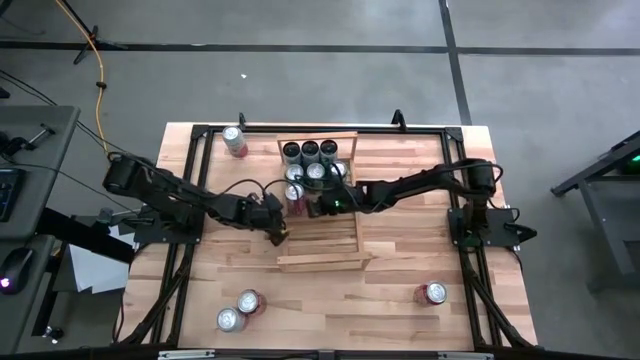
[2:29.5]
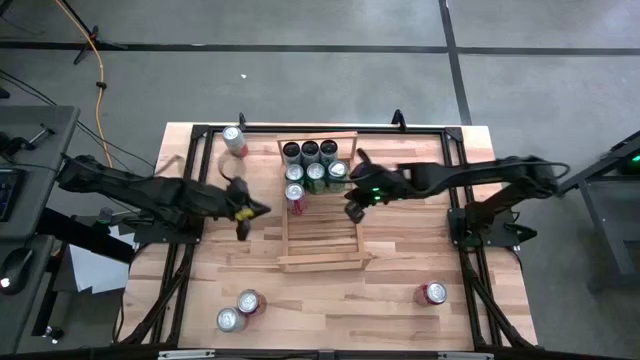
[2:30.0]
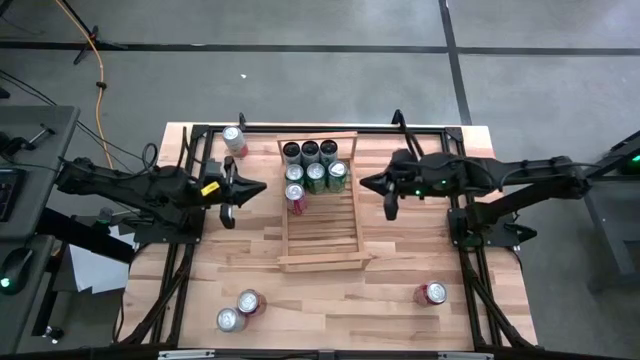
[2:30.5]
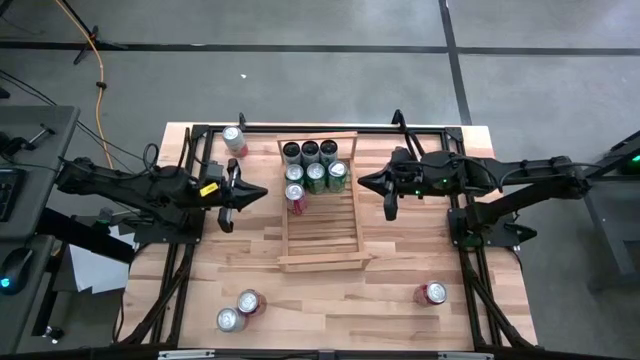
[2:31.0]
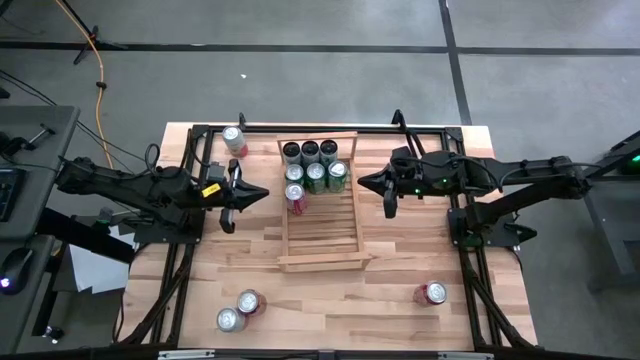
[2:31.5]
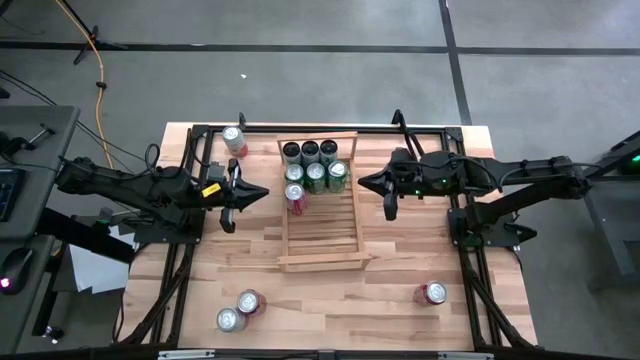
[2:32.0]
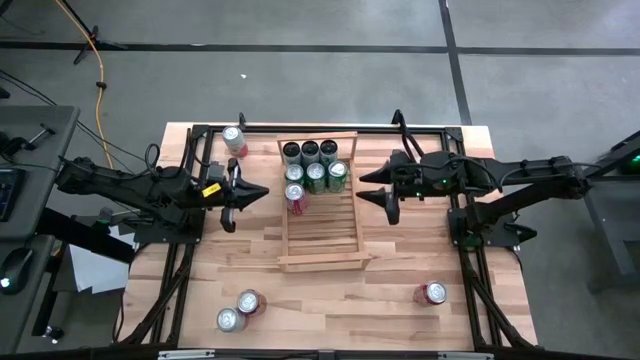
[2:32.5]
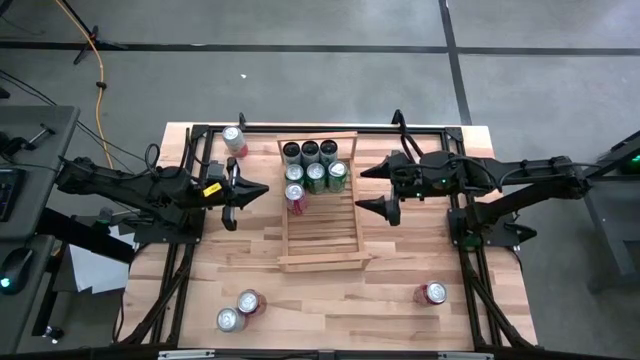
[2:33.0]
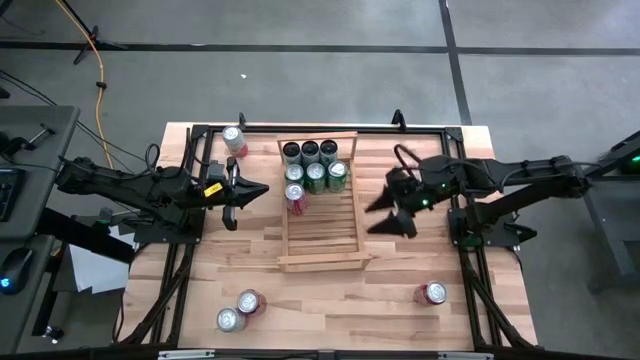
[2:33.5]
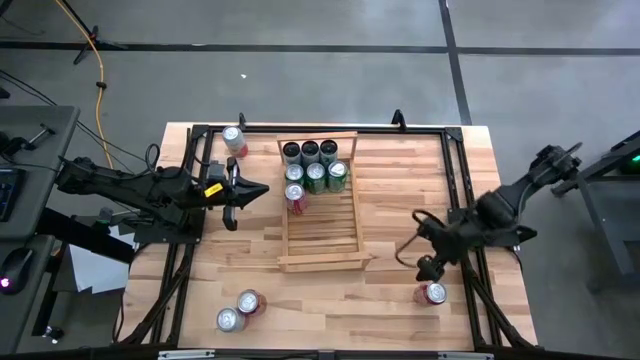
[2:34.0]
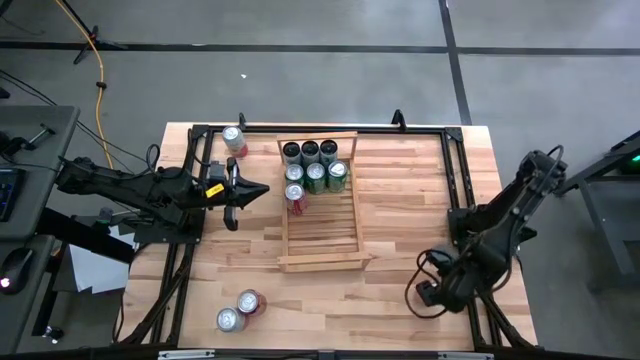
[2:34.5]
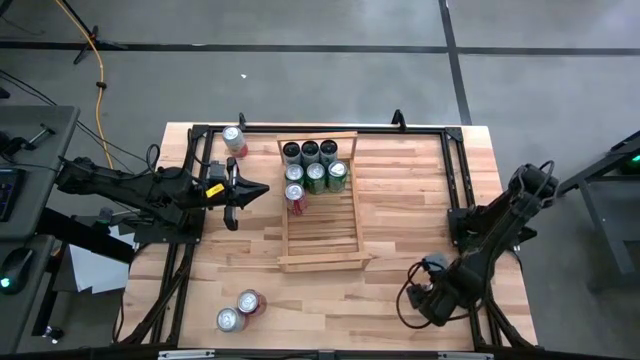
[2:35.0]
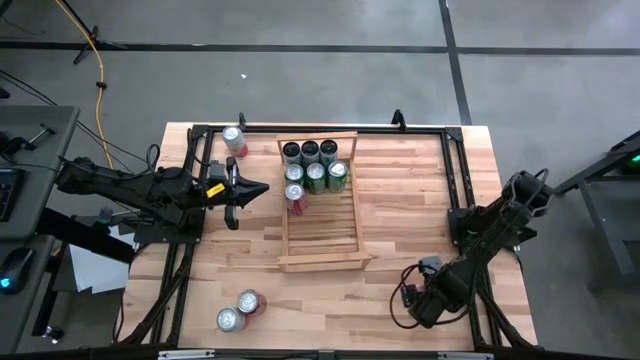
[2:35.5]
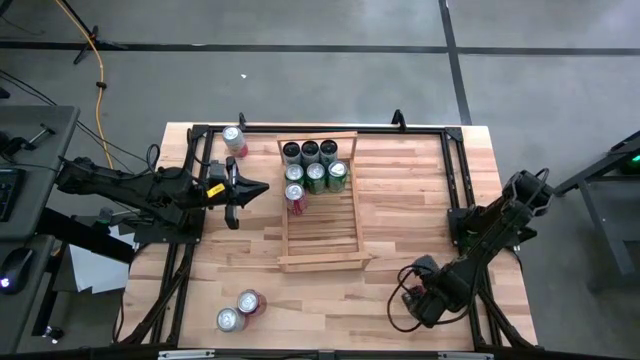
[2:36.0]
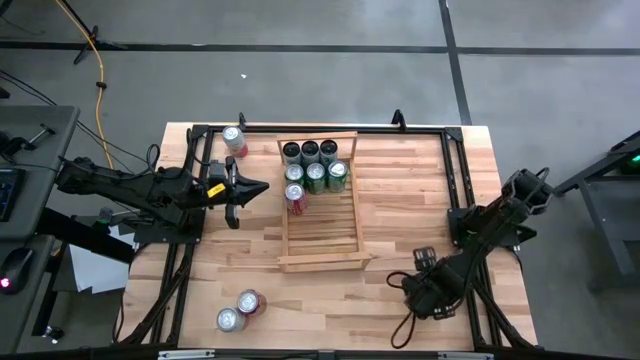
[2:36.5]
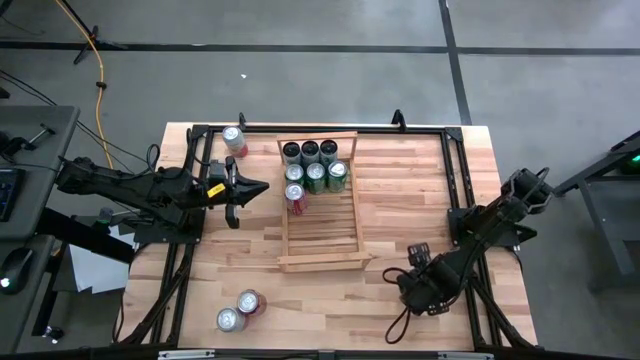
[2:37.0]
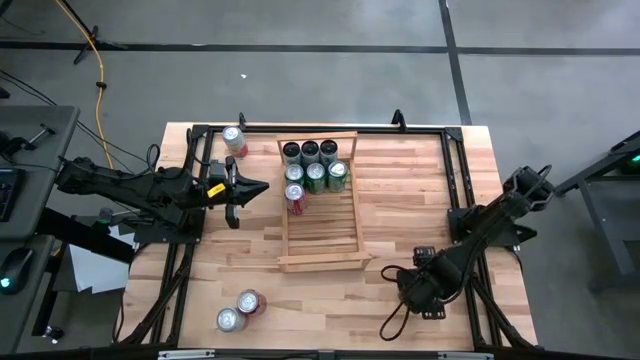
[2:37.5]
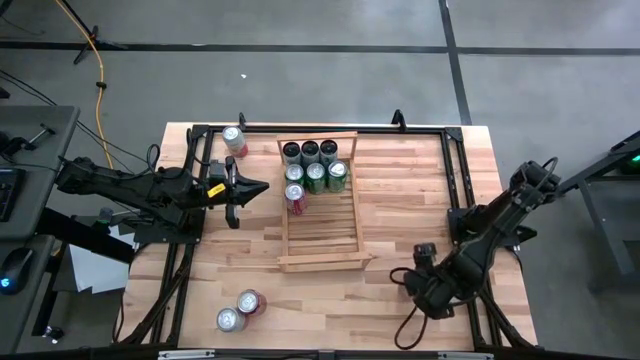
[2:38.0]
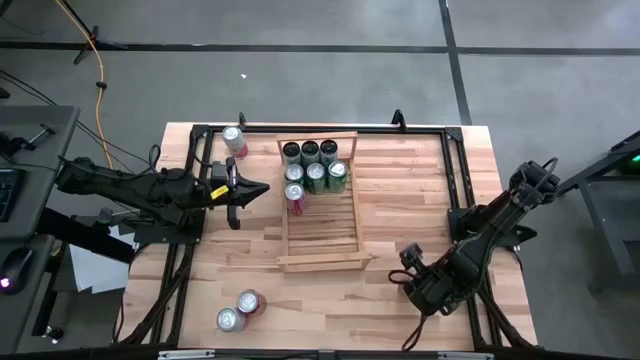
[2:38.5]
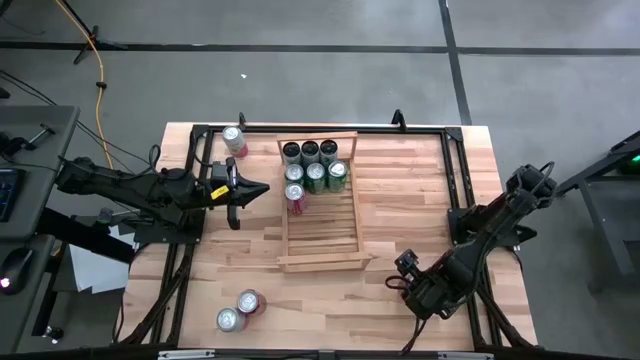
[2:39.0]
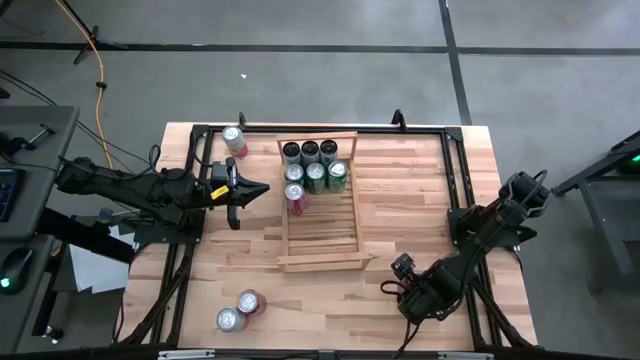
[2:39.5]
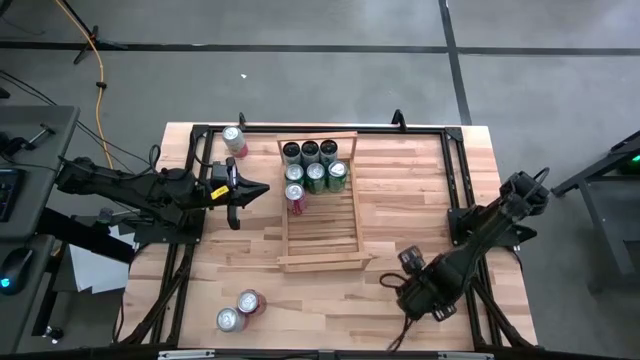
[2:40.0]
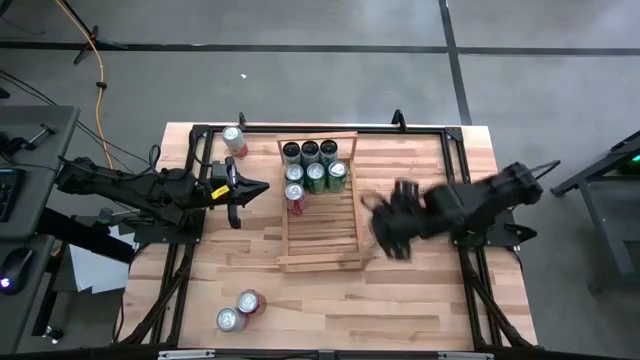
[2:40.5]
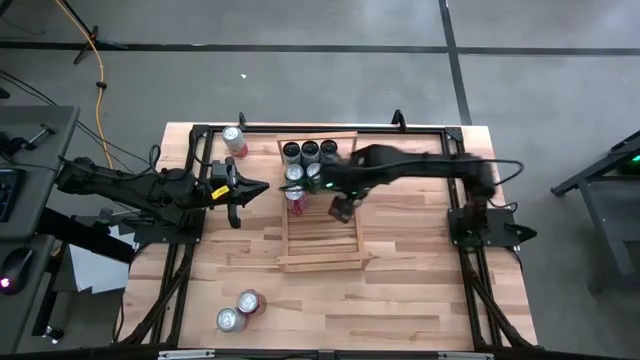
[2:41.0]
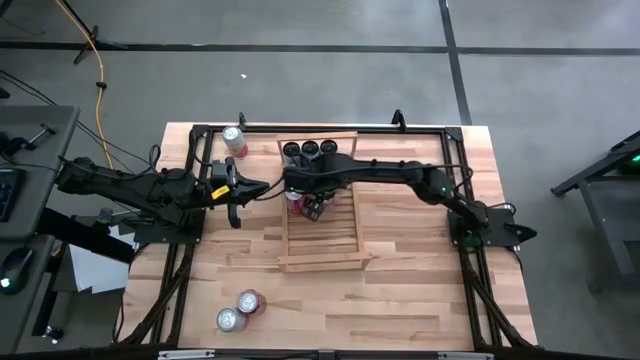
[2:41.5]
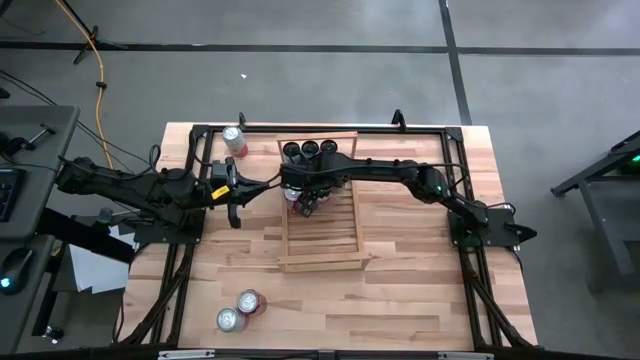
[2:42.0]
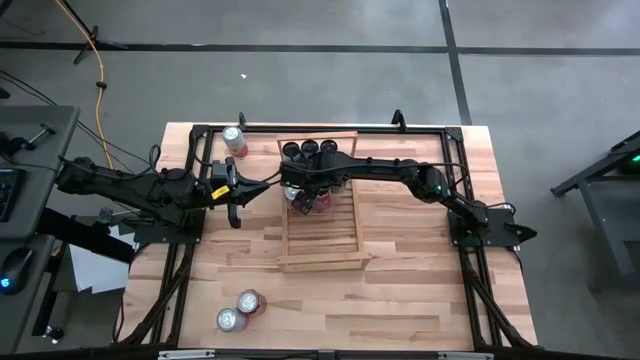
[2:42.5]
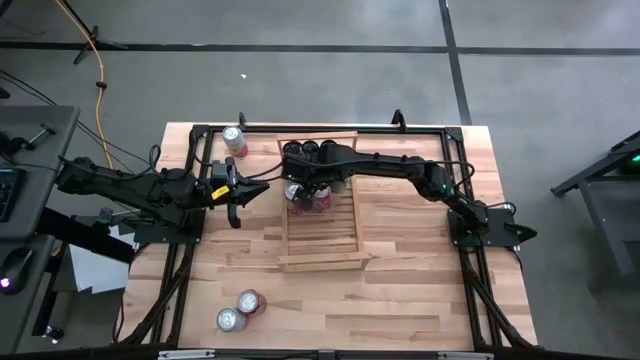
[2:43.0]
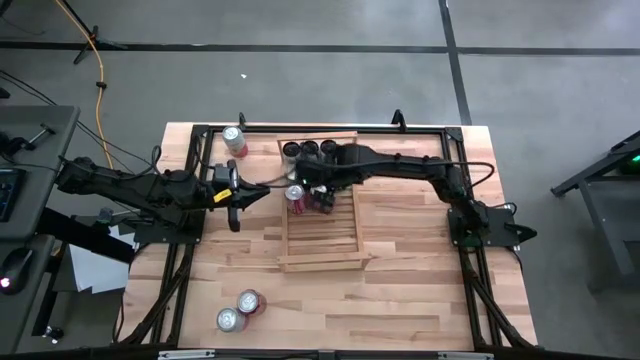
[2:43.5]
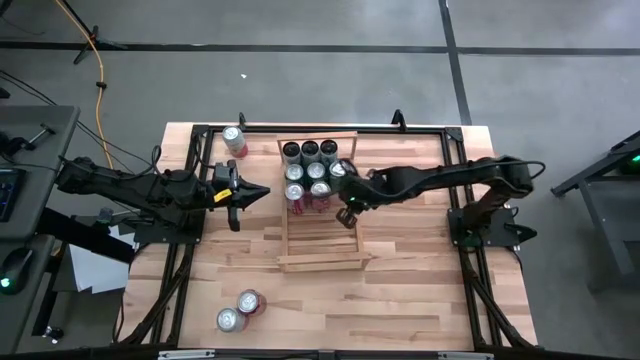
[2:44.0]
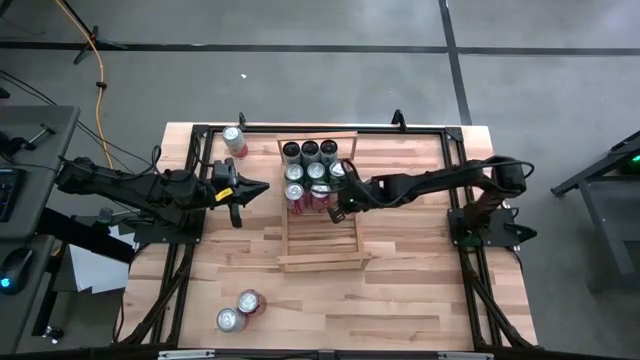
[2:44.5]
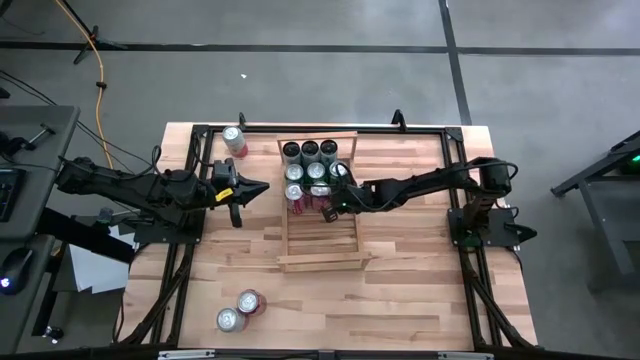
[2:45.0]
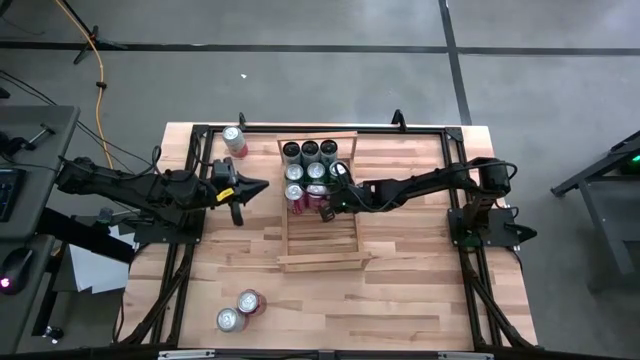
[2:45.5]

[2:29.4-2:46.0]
Task: Place canned beverage on shelf
Put the right red can on the shelf aligned with the other red can

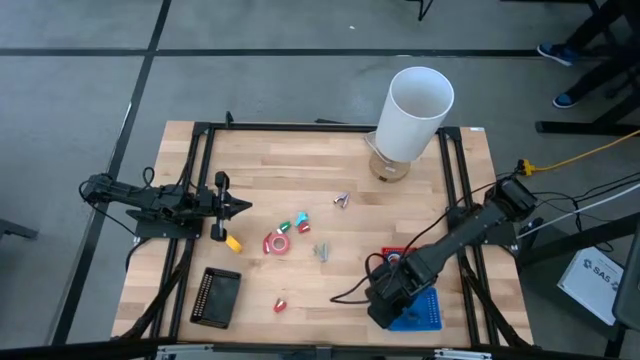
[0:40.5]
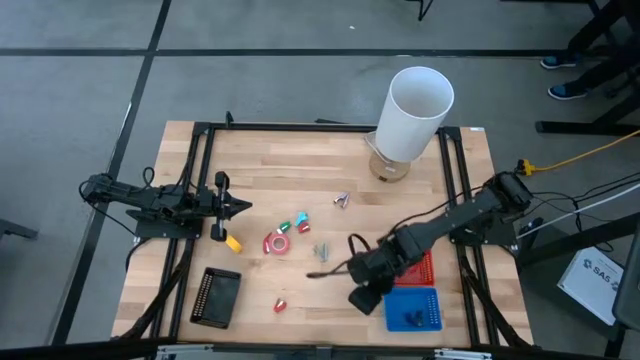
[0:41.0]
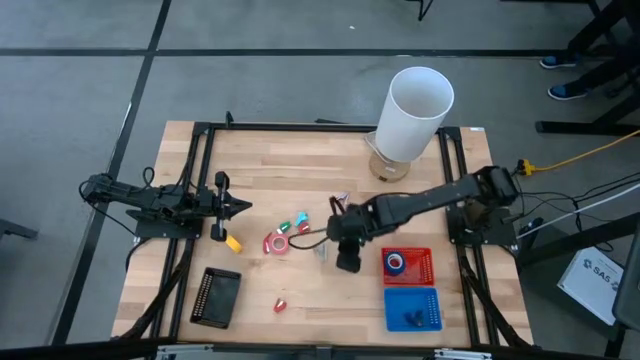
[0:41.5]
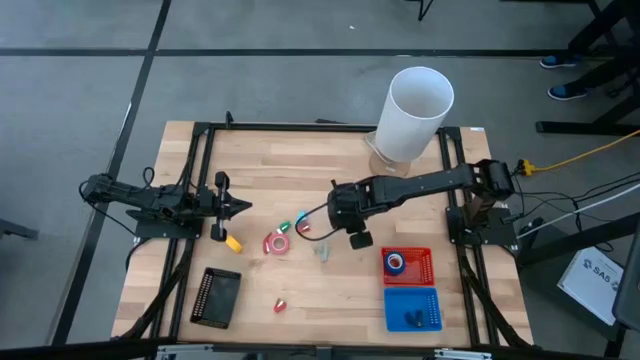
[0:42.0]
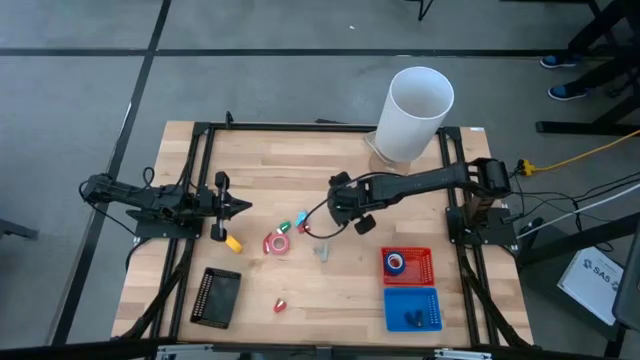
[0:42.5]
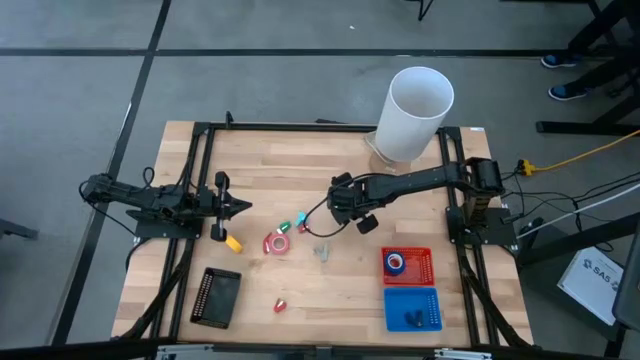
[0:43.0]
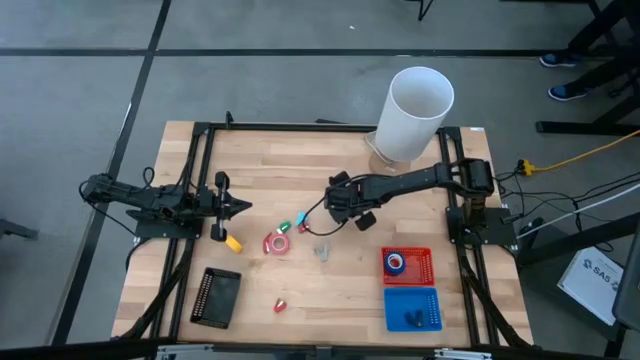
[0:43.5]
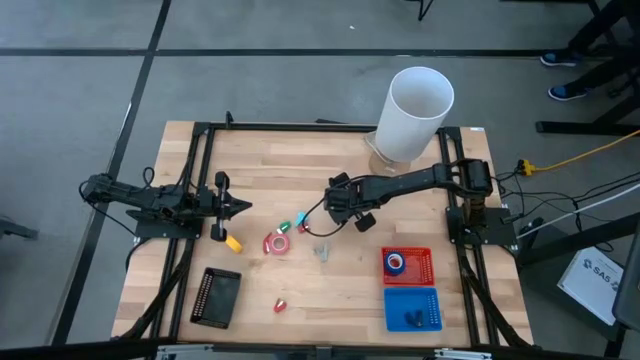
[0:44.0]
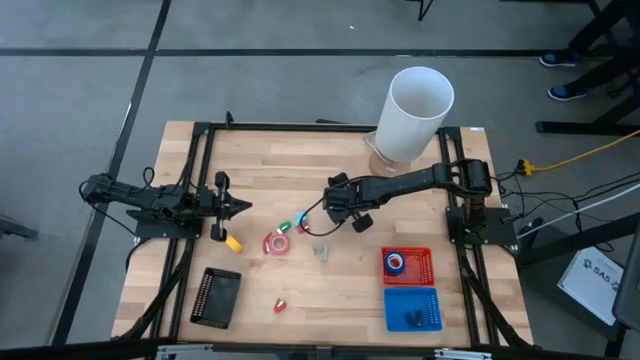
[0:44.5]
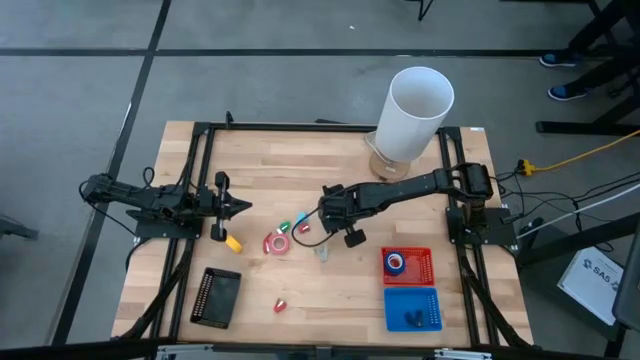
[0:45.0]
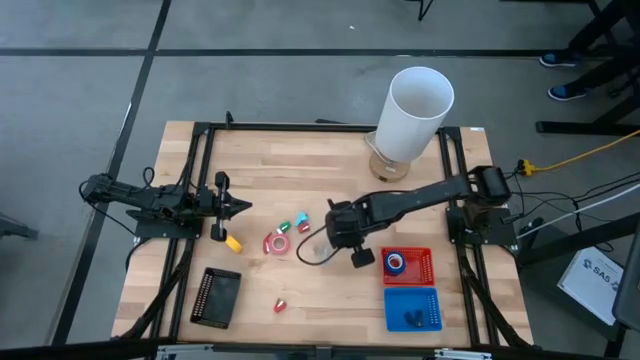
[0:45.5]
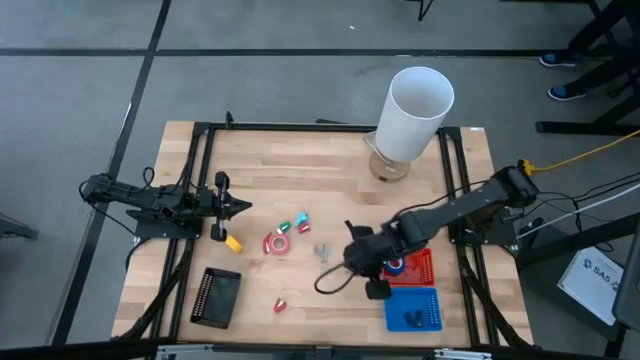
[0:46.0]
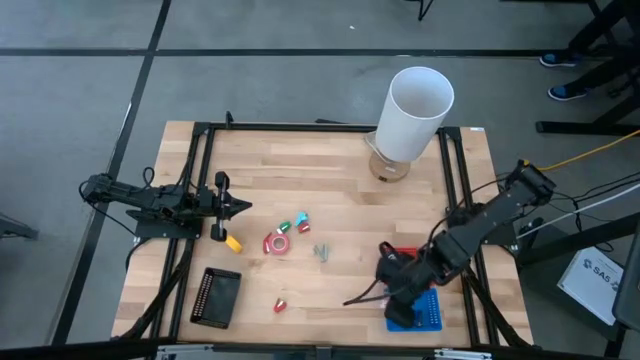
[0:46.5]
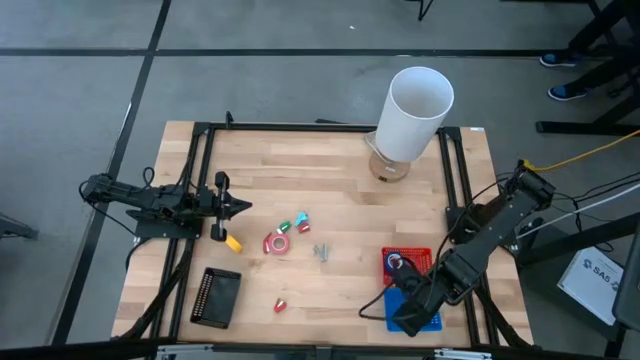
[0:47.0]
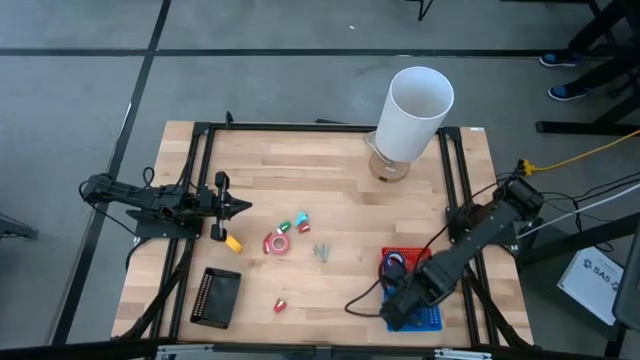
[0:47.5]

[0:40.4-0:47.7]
Task: Pick and place Stapler, Stapler remover, tape
Put the pink staple remover into the blue basket
